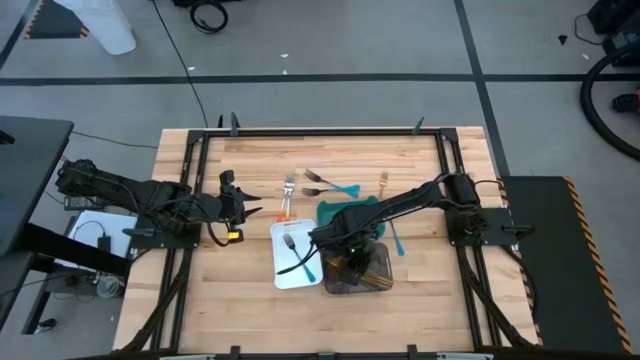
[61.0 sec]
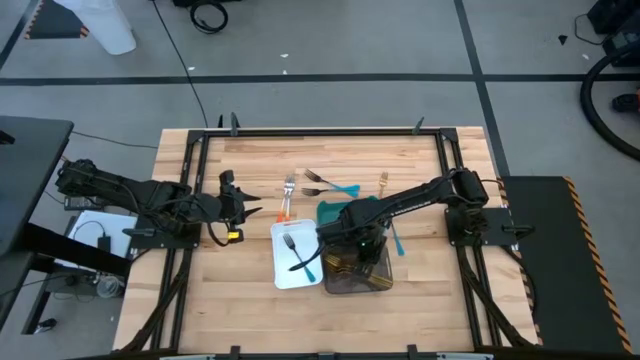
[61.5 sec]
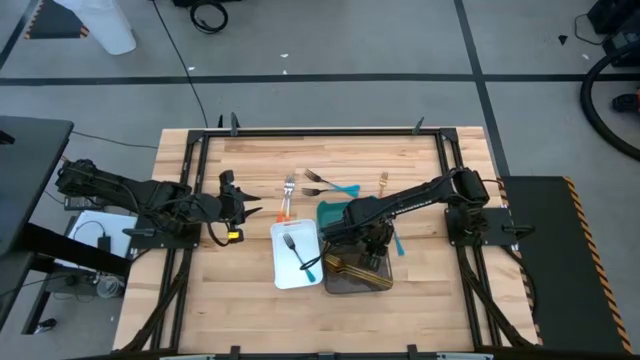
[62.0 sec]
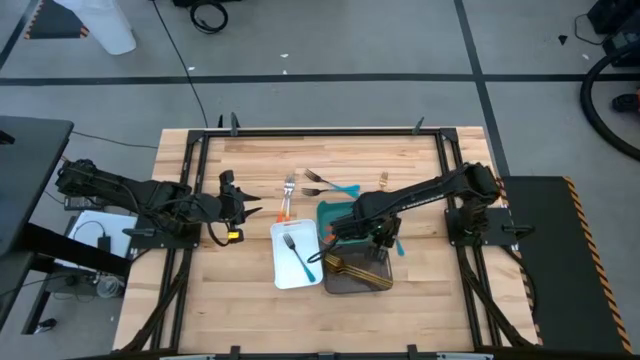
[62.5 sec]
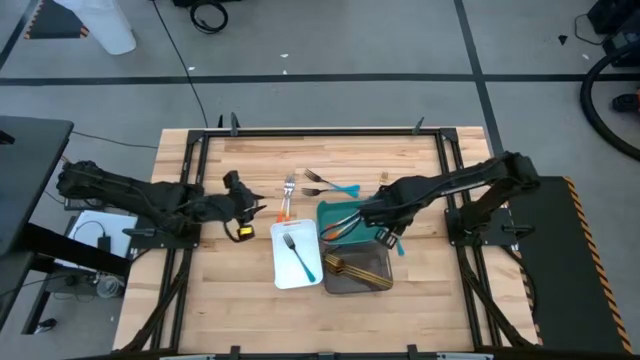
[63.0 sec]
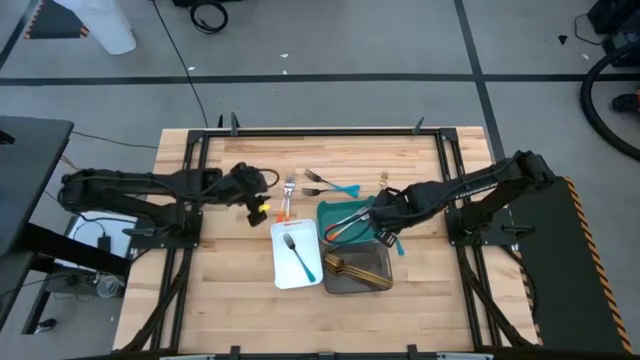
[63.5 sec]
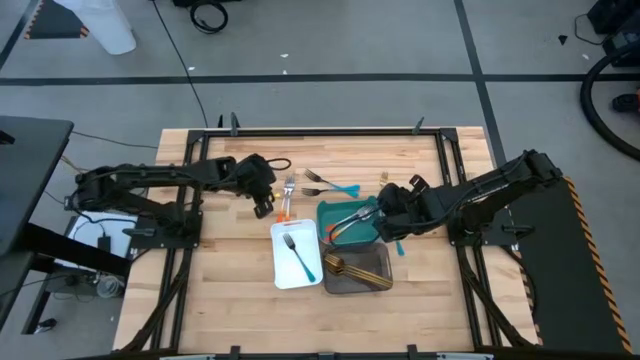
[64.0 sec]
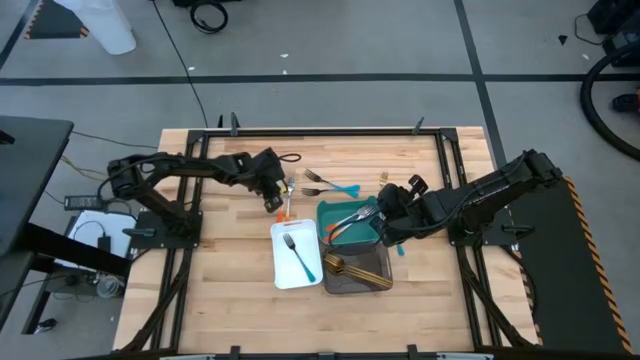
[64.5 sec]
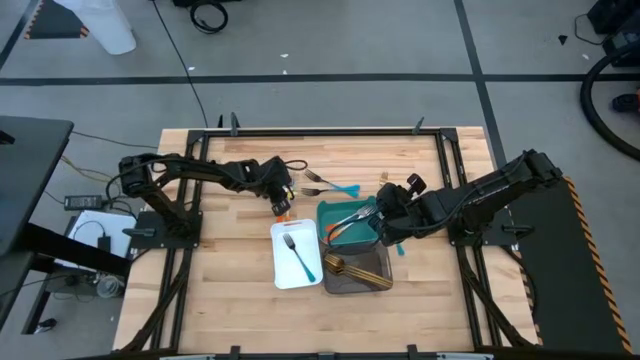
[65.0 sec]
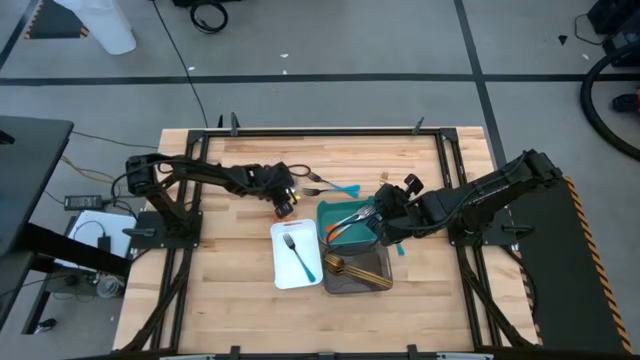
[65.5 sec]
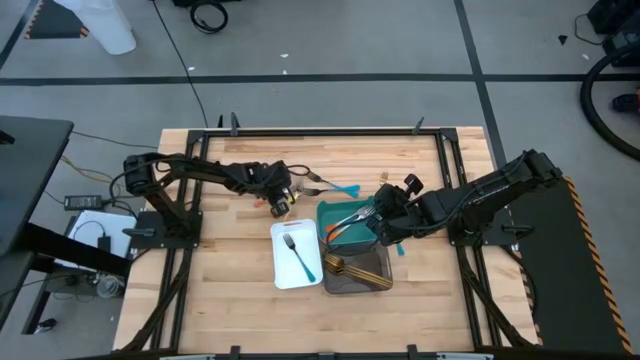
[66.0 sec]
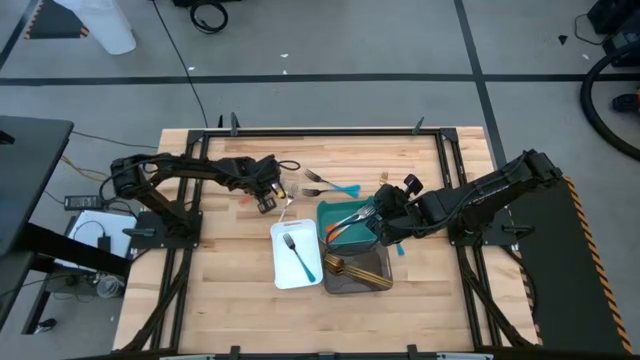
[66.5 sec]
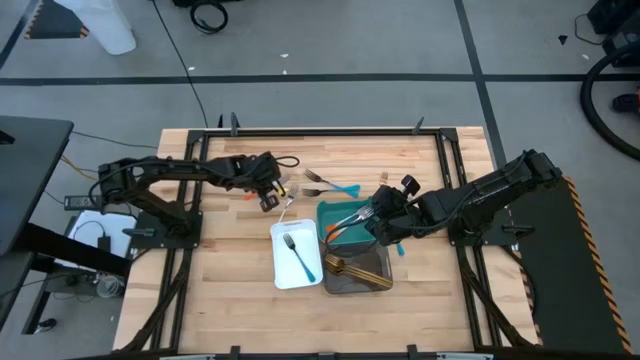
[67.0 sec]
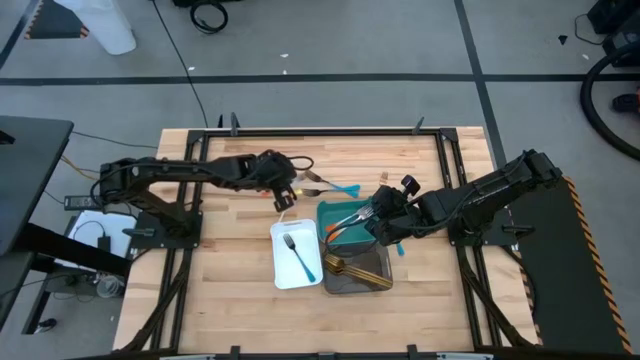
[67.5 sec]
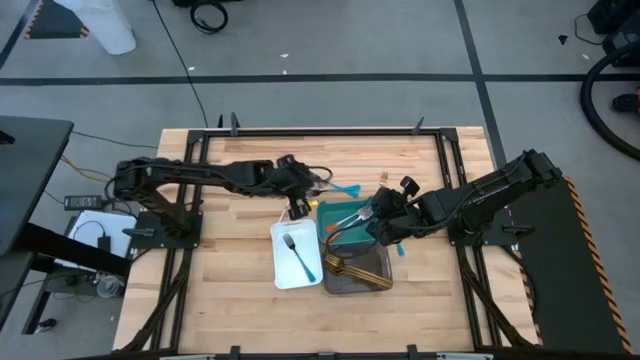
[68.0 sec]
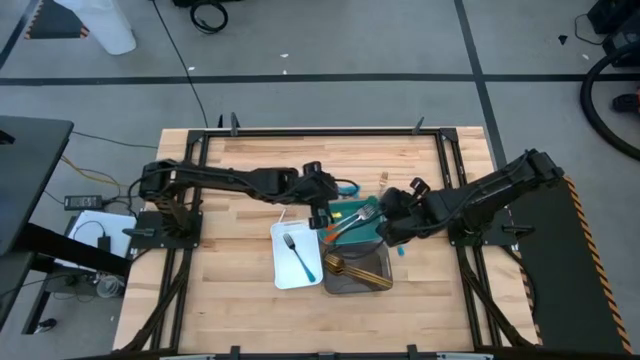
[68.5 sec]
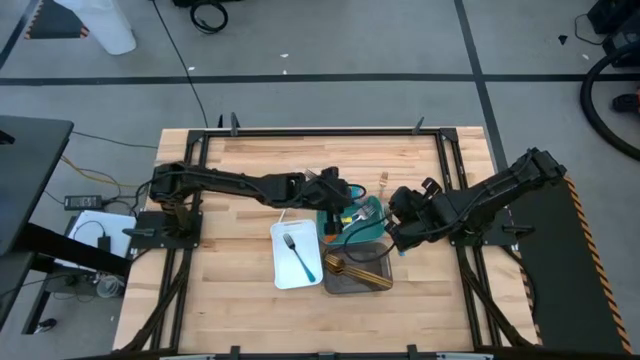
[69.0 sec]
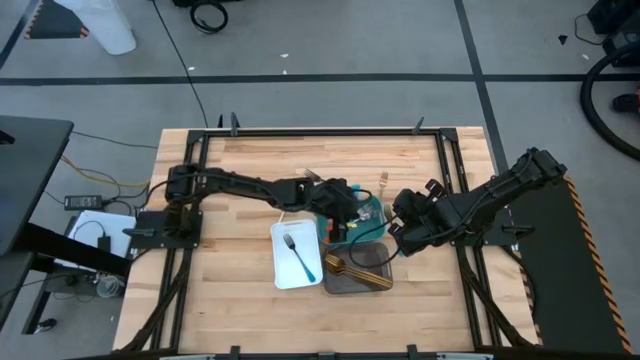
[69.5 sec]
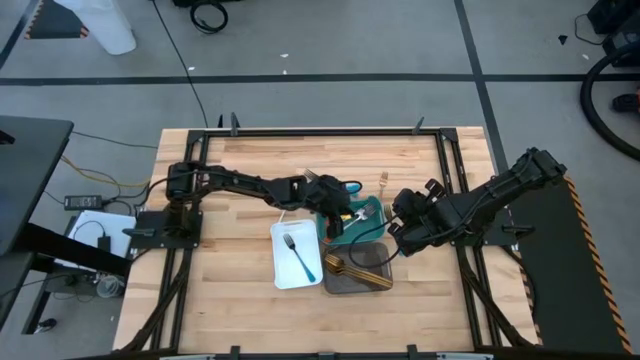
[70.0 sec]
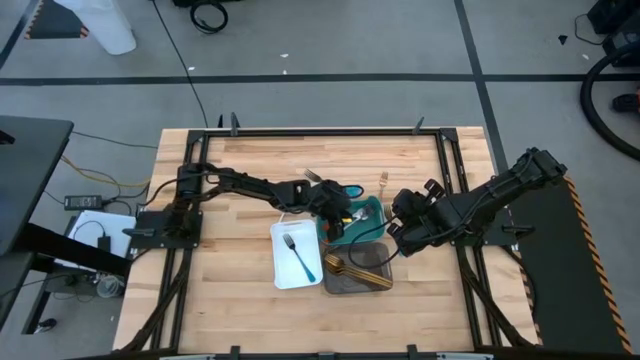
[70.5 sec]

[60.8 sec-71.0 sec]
Task: Sort silverware by color (type)
Put the white-orange fork into the green bin

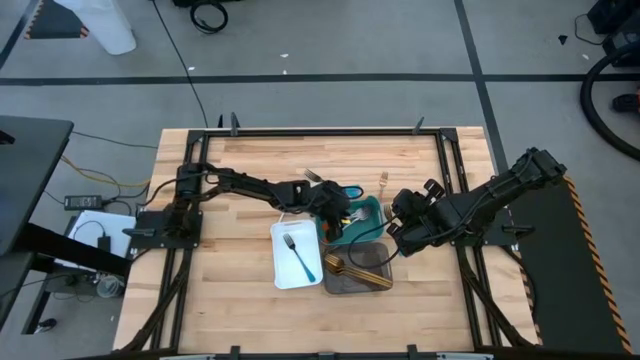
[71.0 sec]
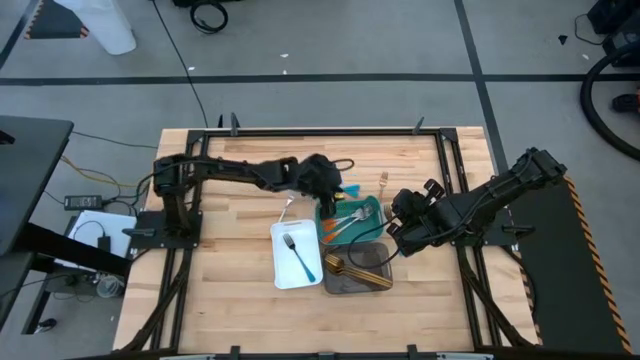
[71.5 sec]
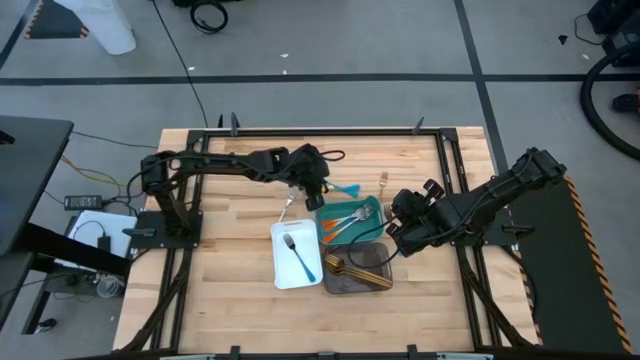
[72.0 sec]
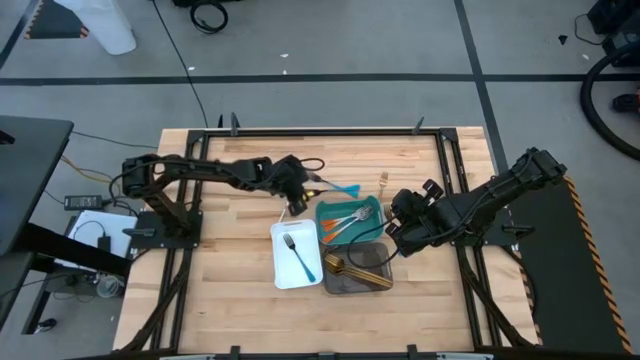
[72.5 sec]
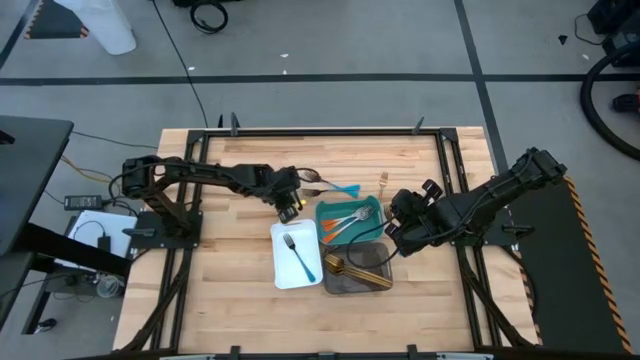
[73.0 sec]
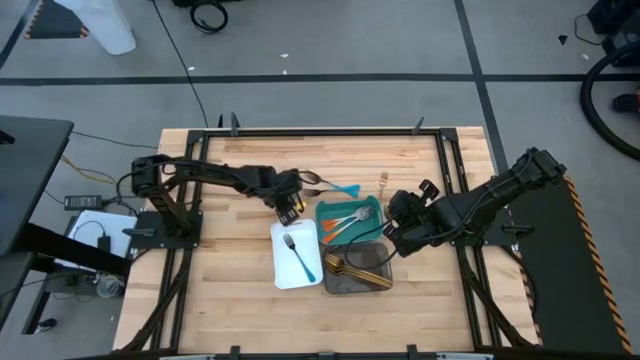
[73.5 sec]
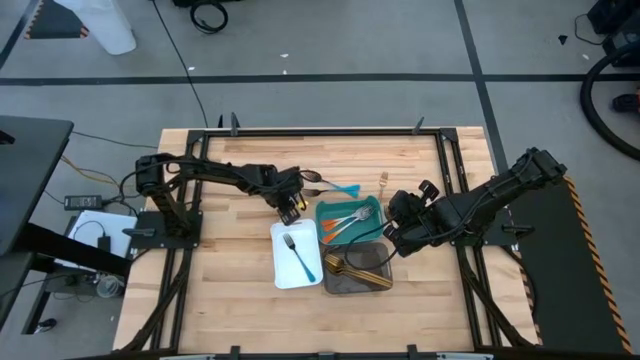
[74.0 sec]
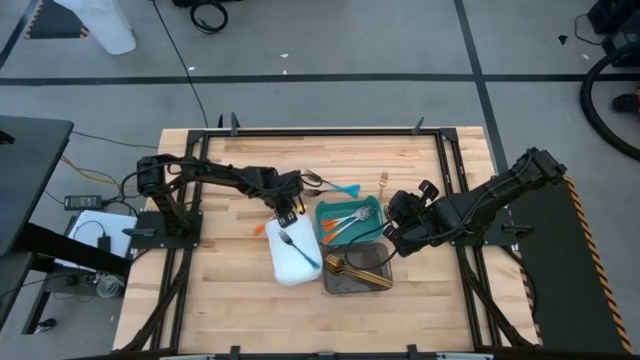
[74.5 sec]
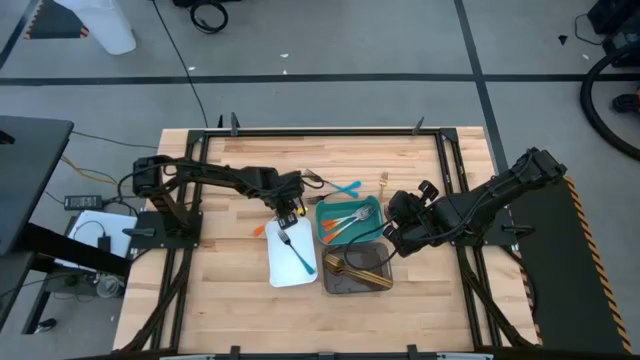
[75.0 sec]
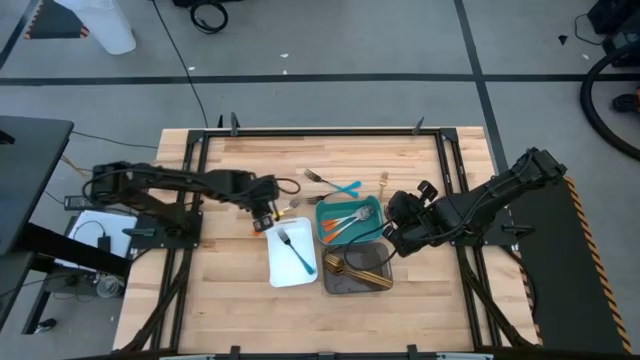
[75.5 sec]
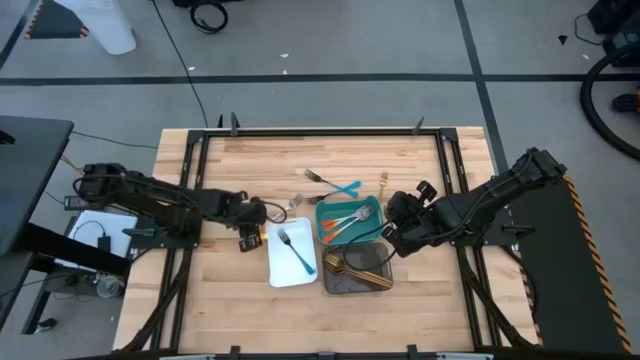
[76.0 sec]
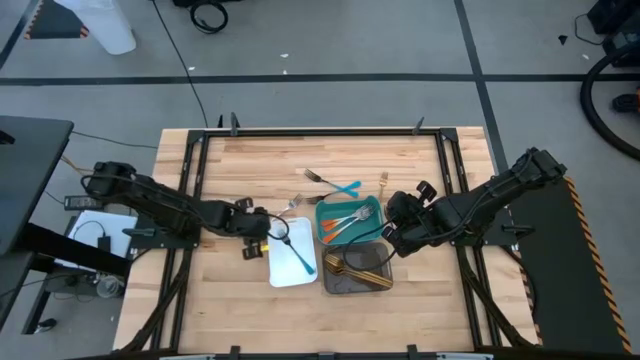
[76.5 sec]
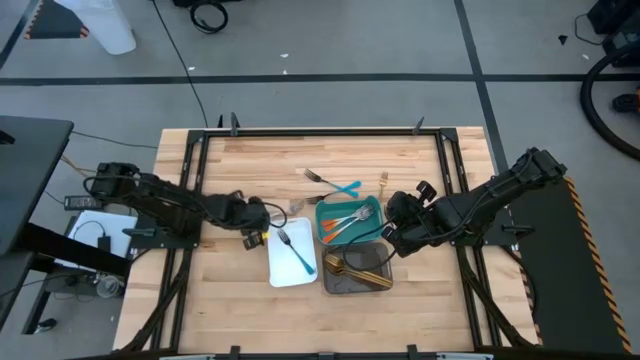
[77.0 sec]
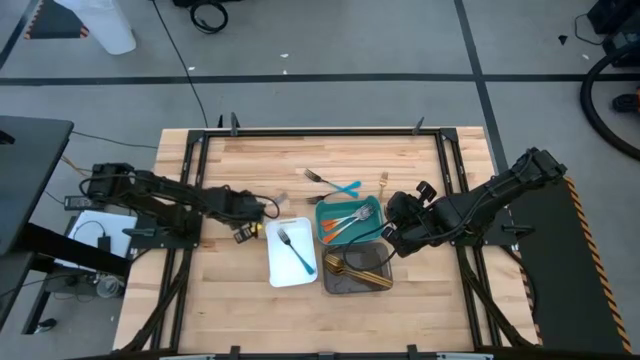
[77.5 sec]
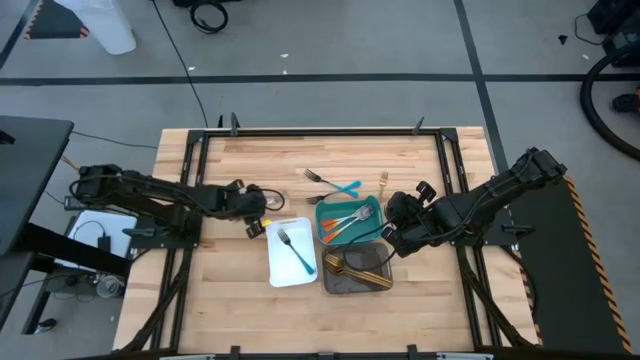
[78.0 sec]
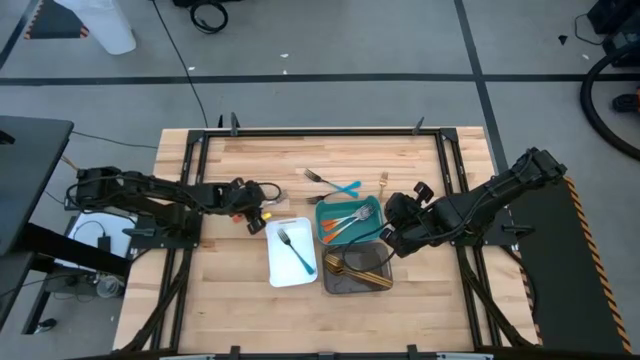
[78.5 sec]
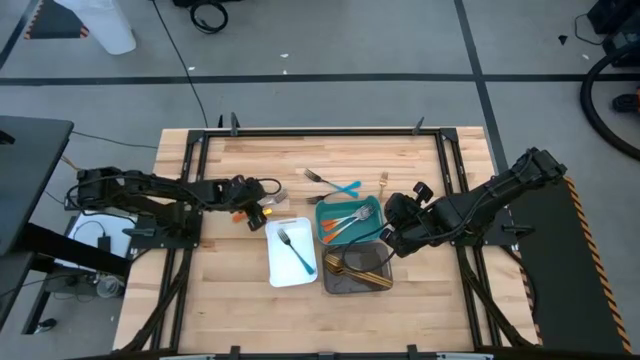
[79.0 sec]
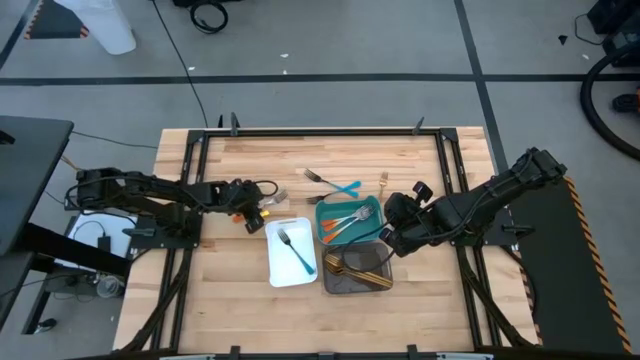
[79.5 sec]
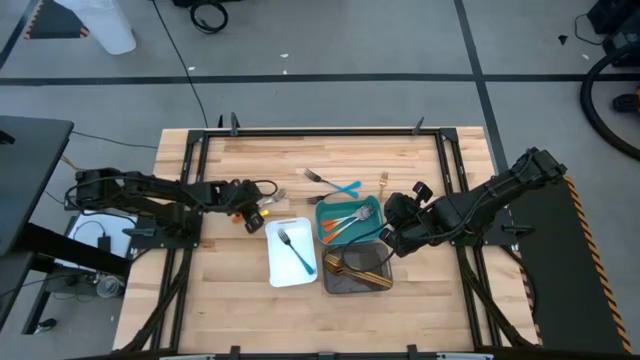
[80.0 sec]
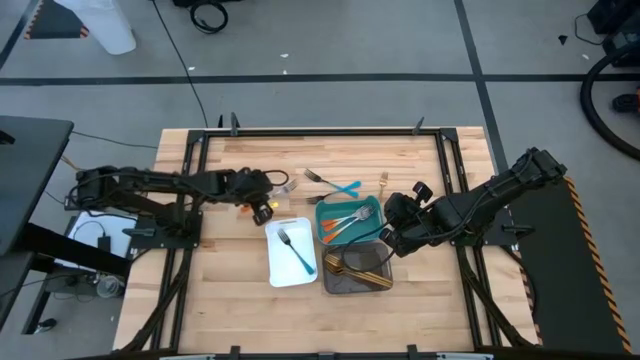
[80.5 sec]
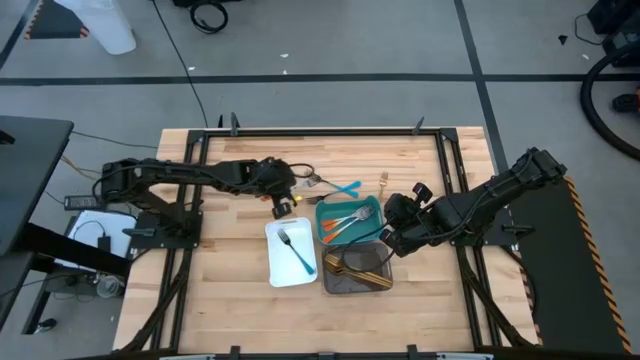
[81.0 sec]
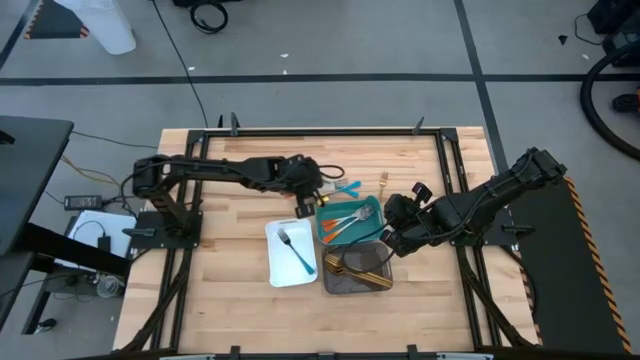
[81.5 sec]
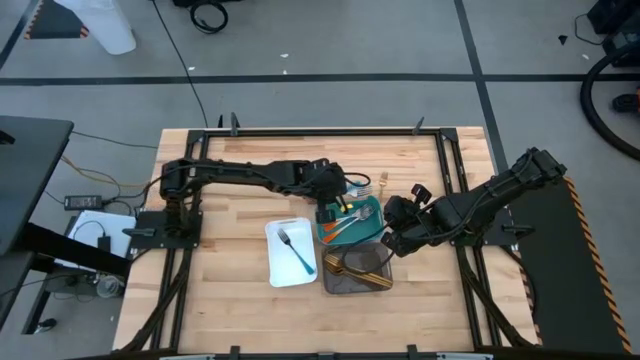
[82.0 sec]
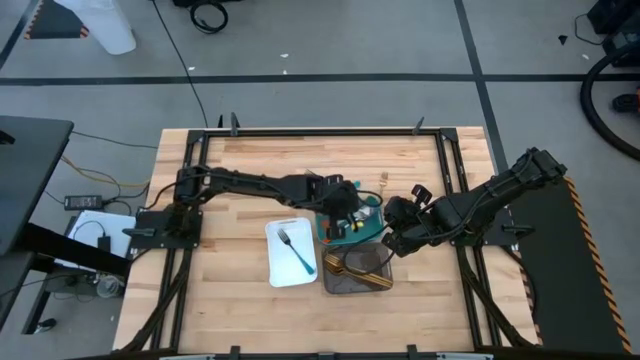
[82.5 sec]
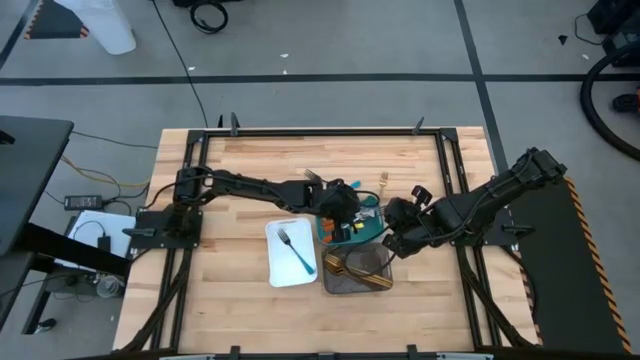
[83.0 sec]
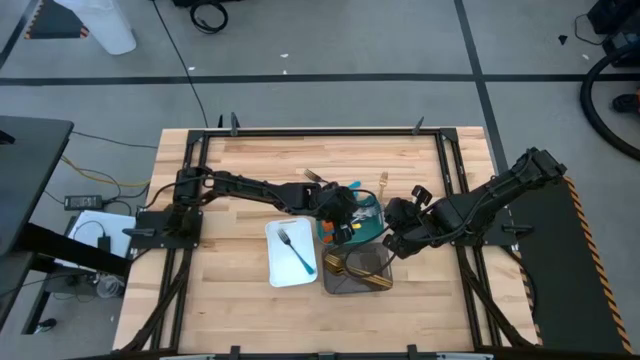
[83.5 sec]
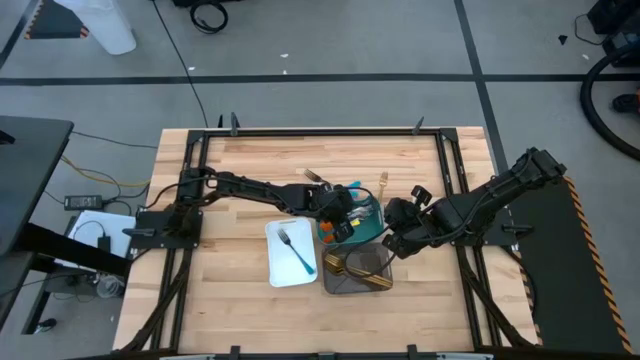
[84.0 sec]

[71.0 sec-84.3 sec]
Put the white-orange fork into the green bin
